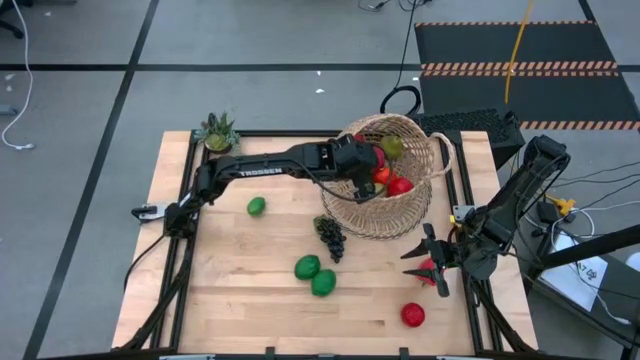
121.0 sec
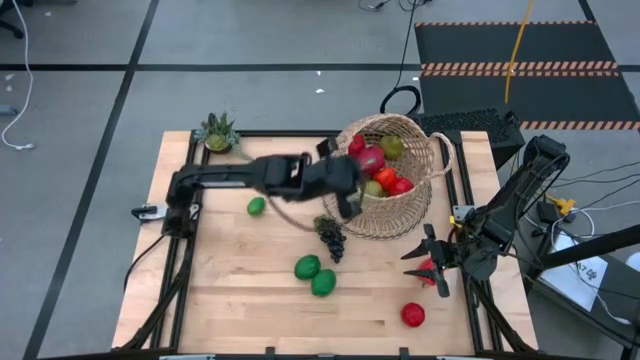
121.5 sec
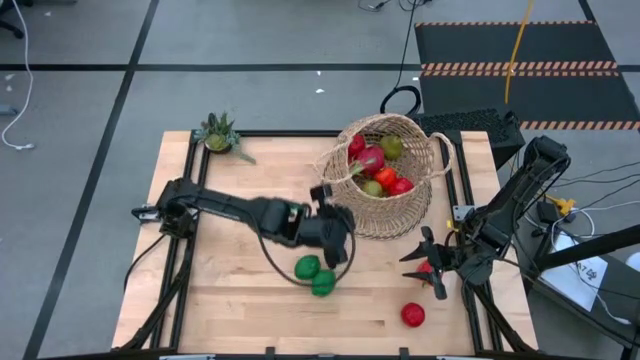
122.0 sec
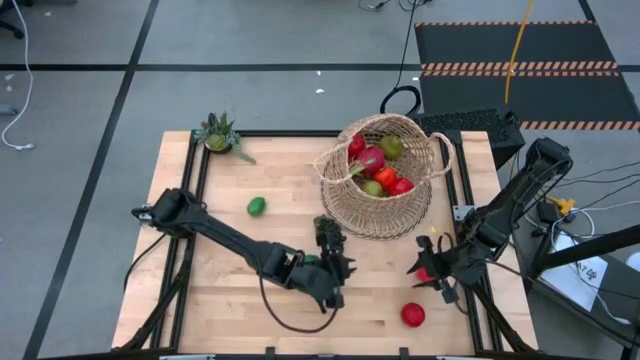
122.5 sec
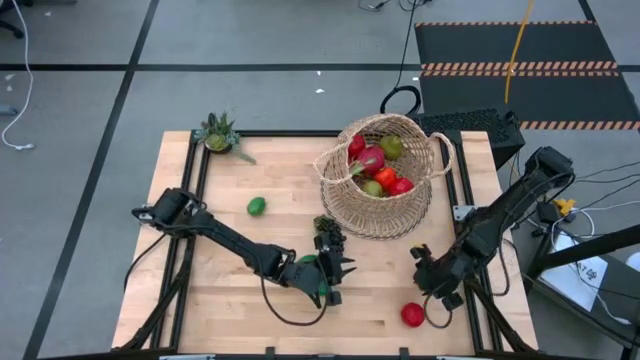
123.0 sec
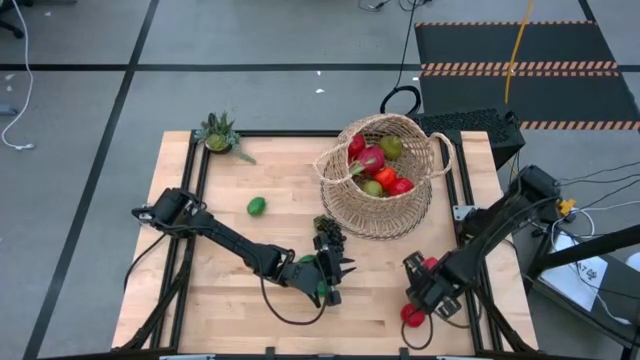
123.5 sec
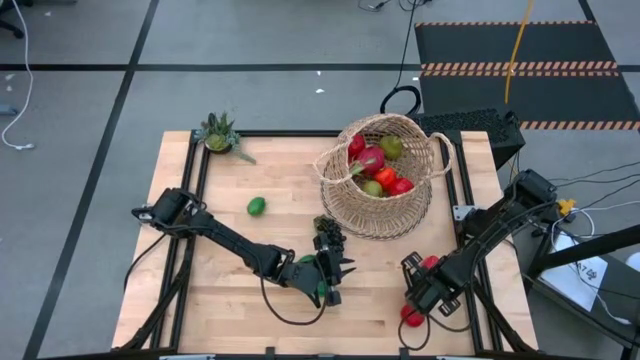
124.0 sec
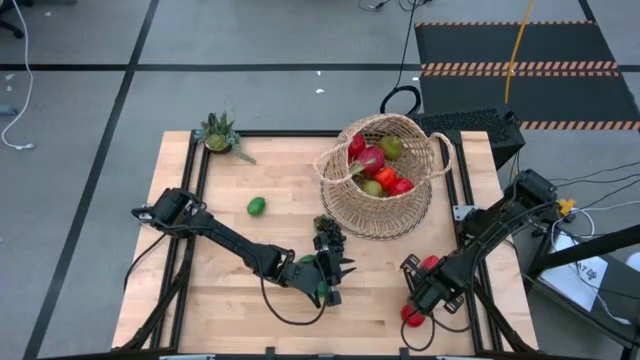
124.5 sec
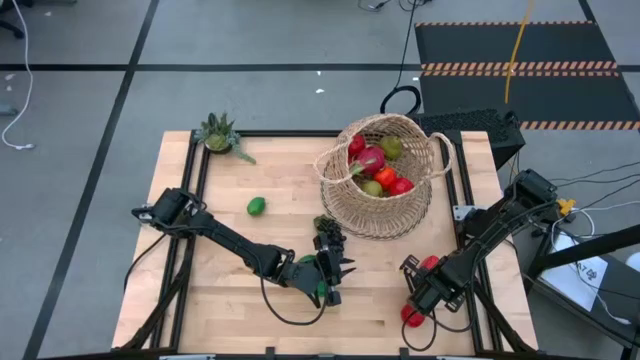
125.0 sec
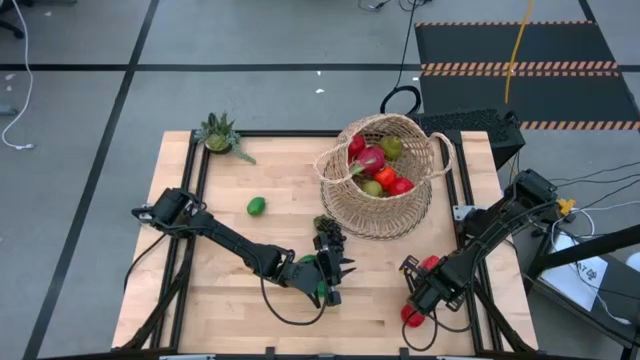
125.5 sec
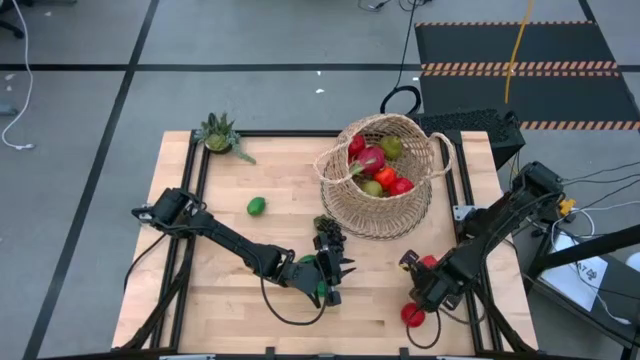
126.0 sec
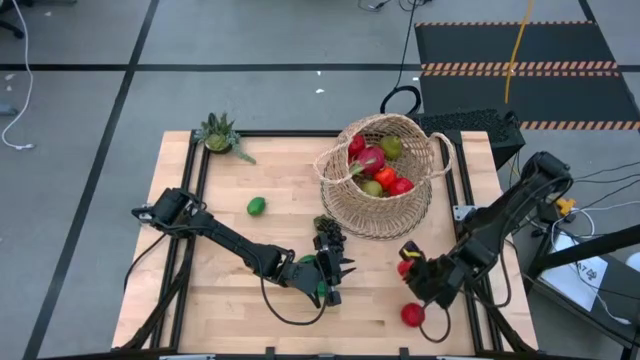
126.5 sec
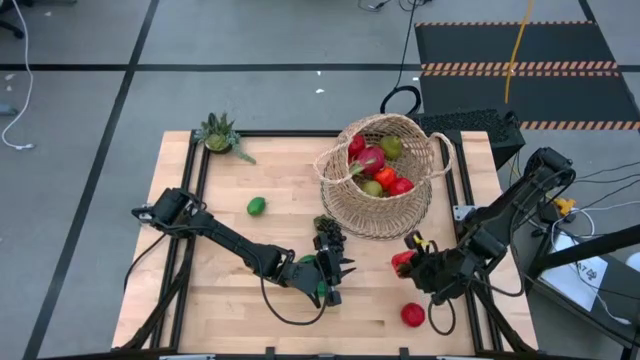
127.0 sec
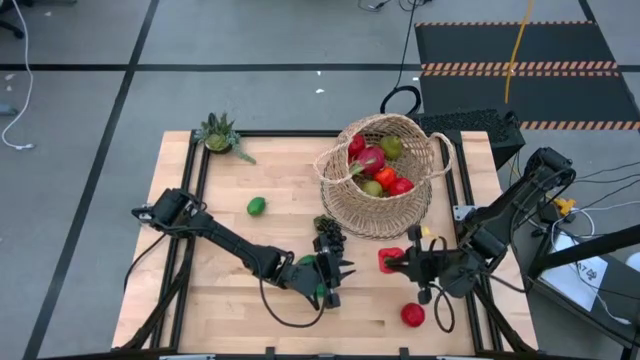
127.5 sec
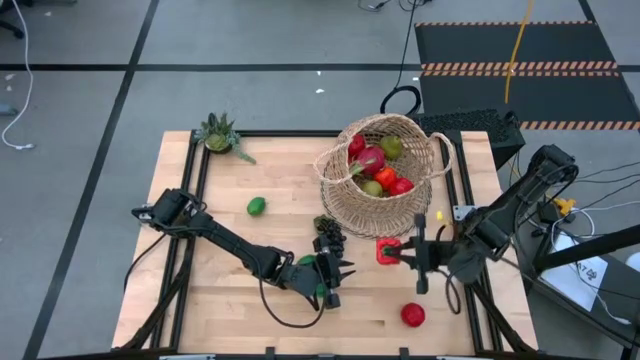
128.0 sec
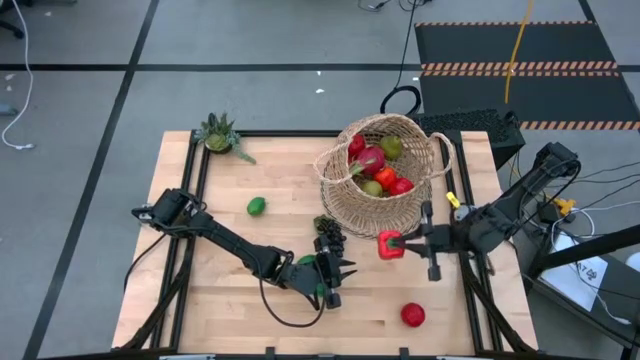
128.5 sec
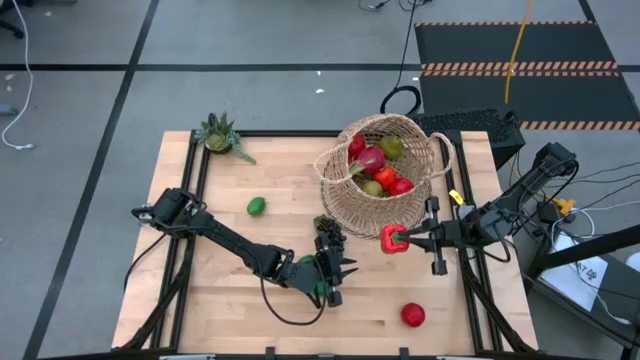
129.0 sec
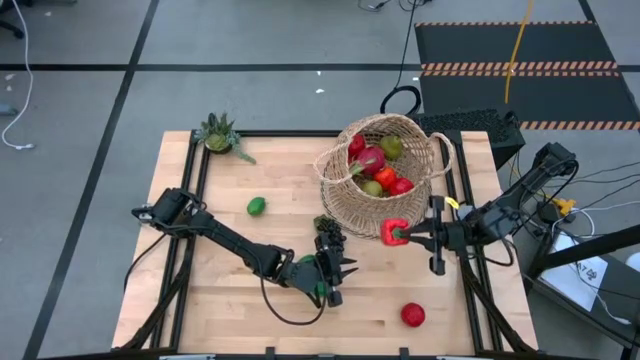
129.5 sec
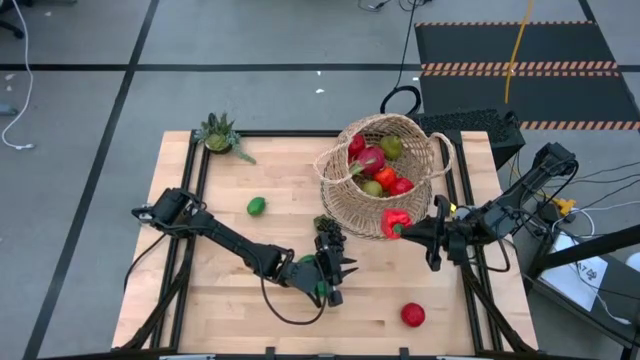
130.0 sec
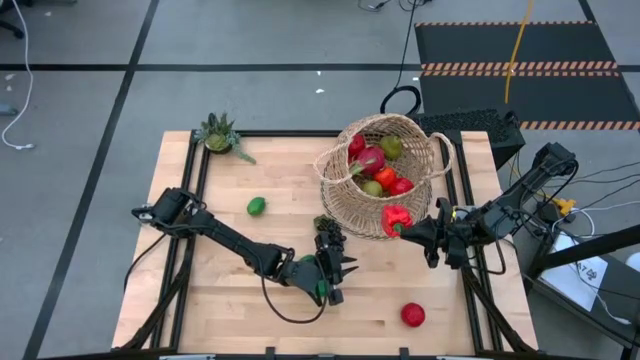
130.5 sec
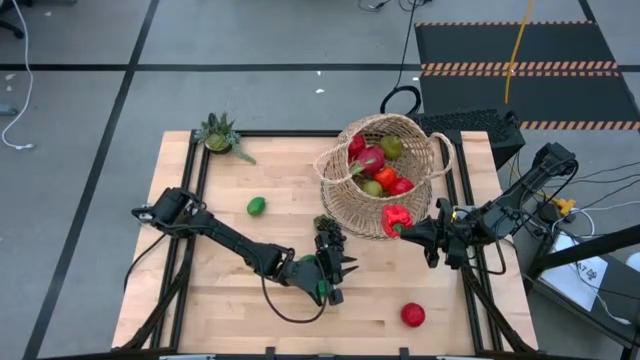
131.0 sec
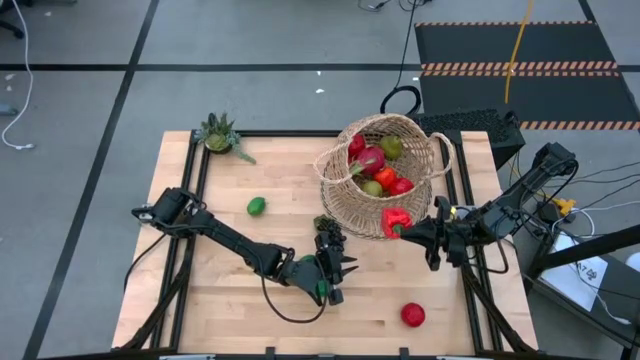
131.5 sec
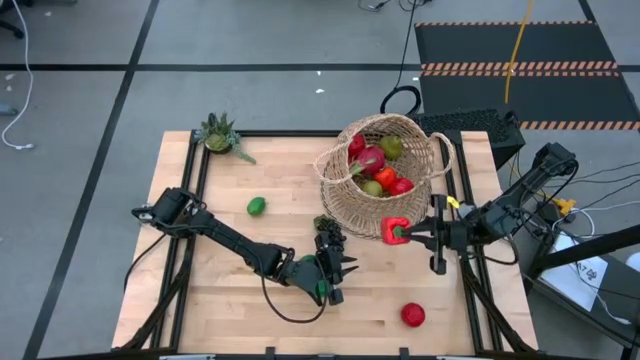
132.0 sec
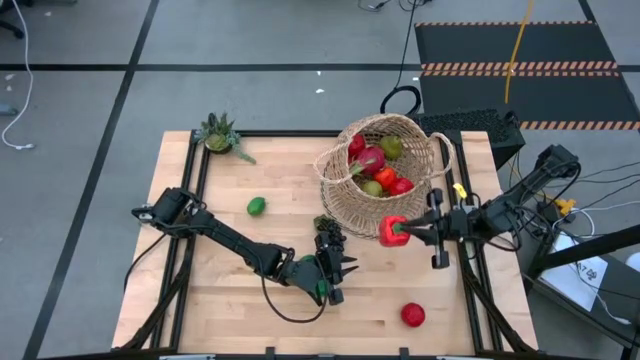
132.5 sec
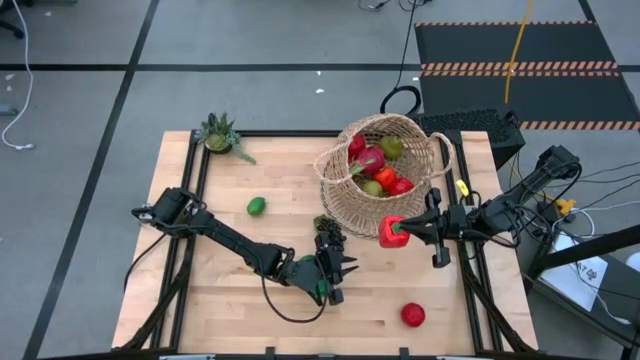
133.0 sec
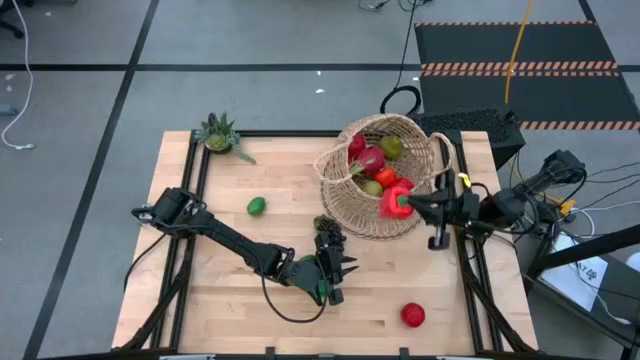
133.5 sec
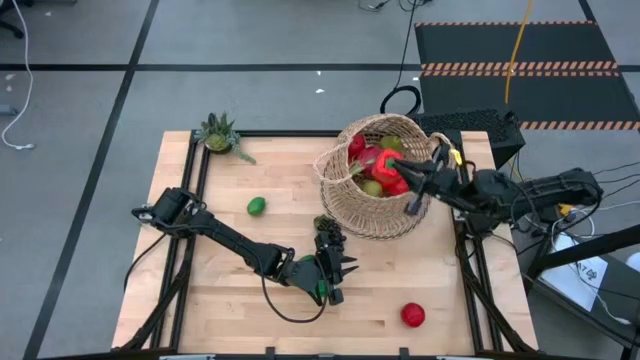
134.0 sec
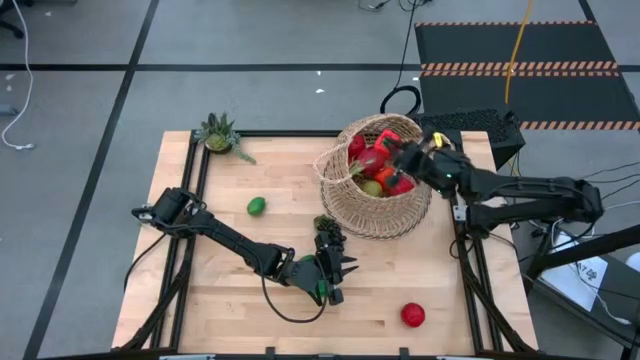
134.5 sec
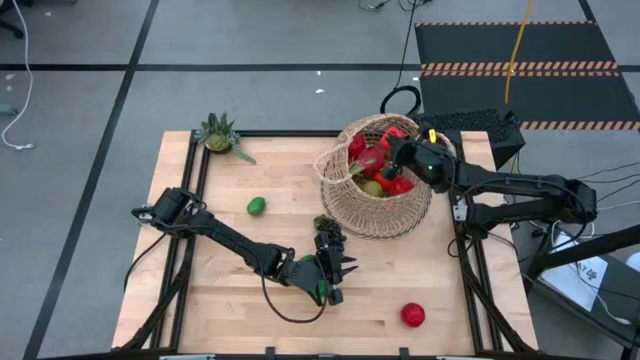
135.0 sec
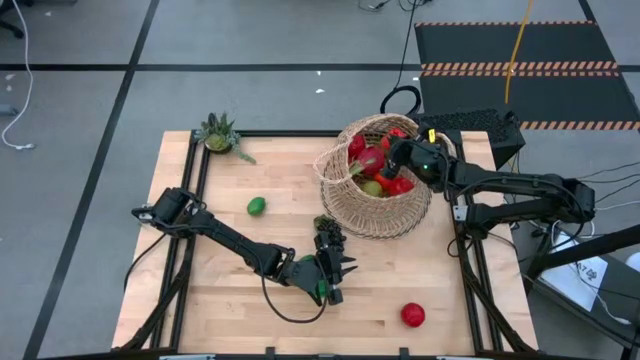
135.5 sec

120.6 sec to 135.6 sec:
Task: Build produce basket
Put the red bell pepper into the brown basket

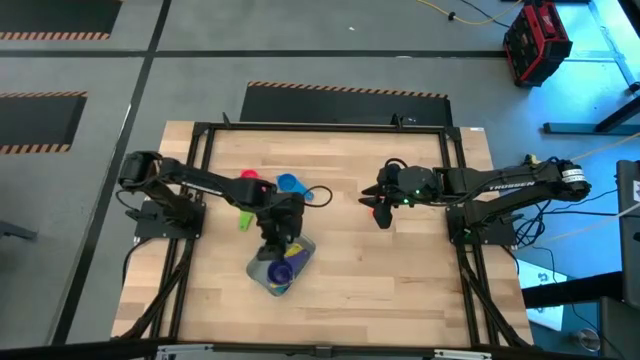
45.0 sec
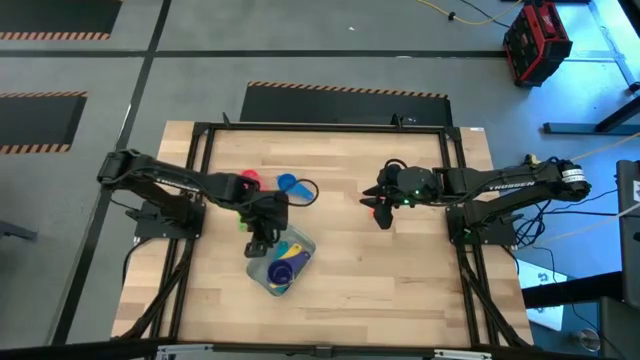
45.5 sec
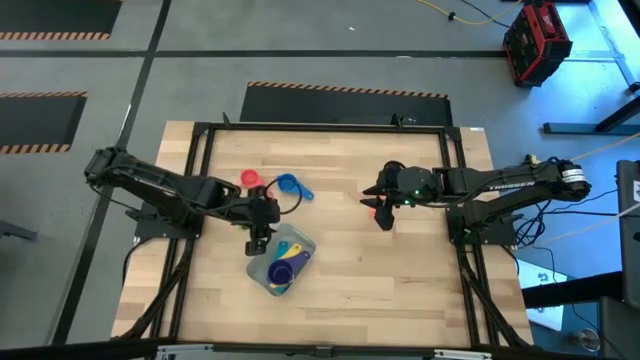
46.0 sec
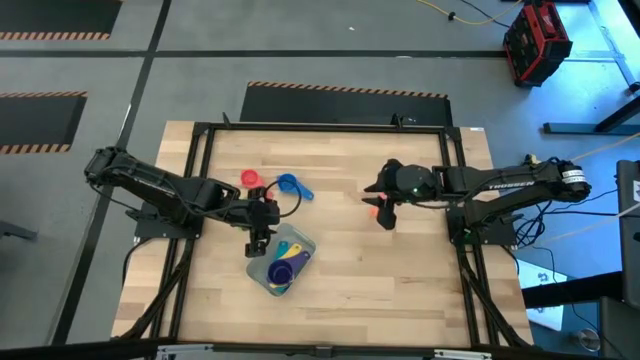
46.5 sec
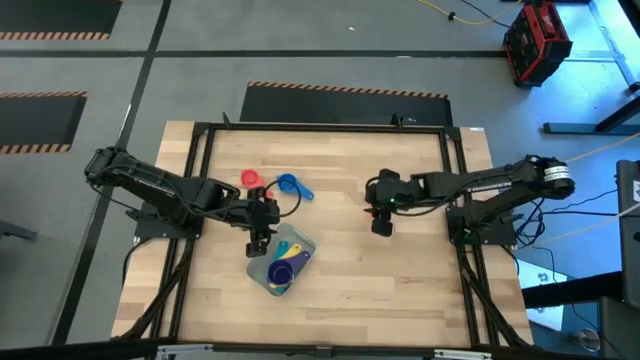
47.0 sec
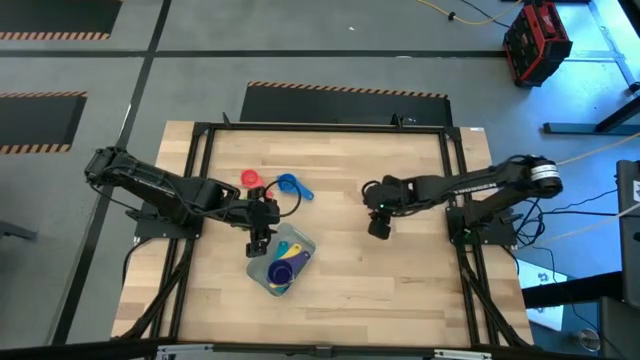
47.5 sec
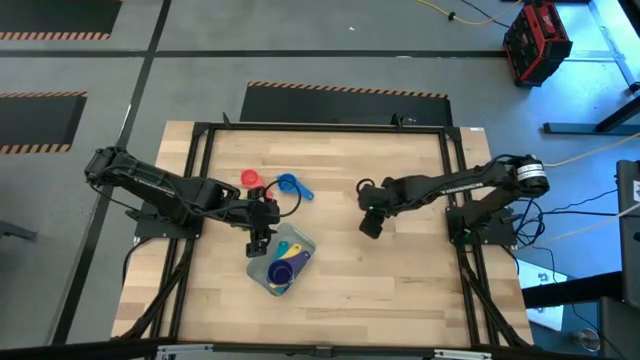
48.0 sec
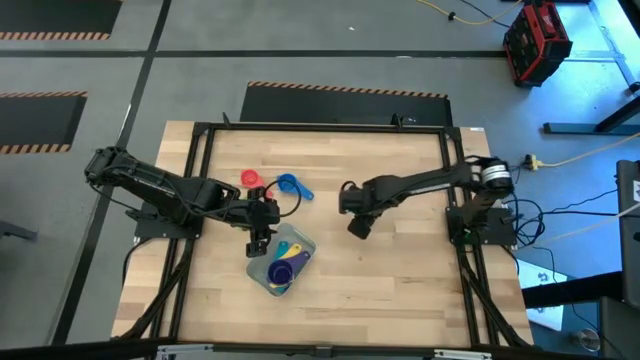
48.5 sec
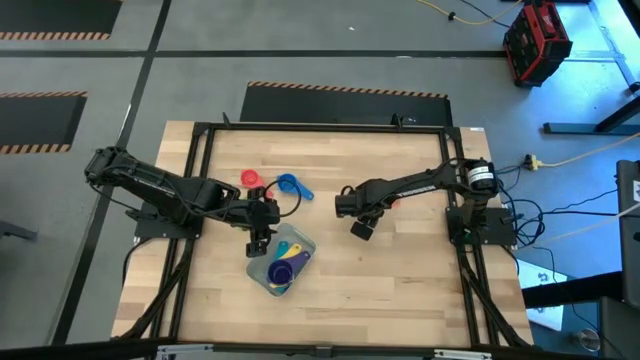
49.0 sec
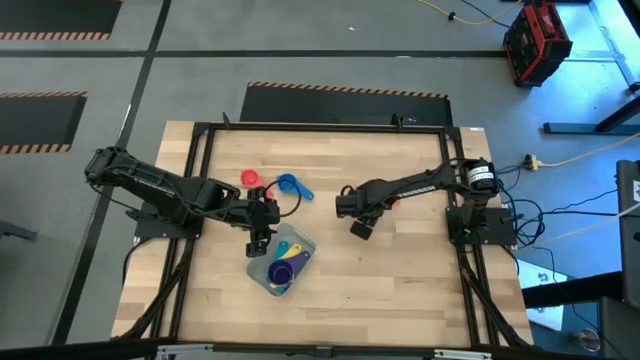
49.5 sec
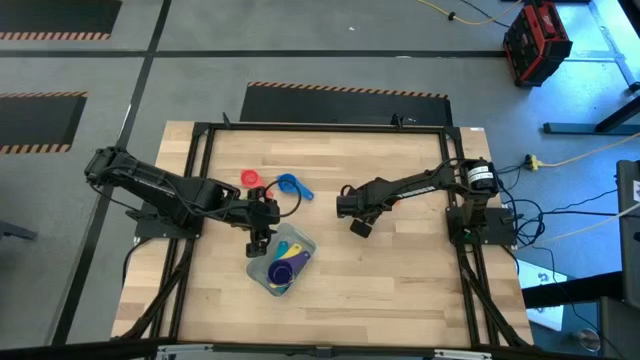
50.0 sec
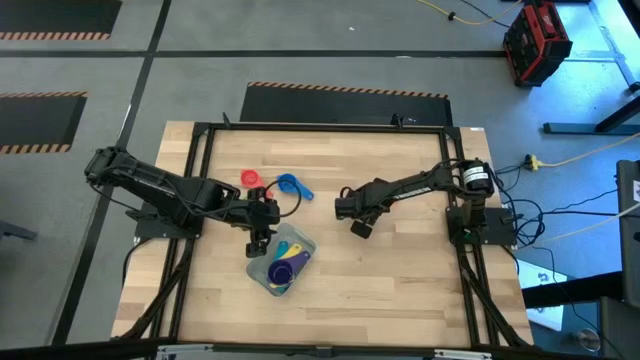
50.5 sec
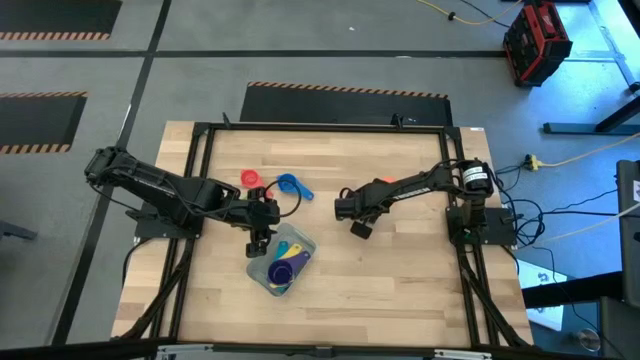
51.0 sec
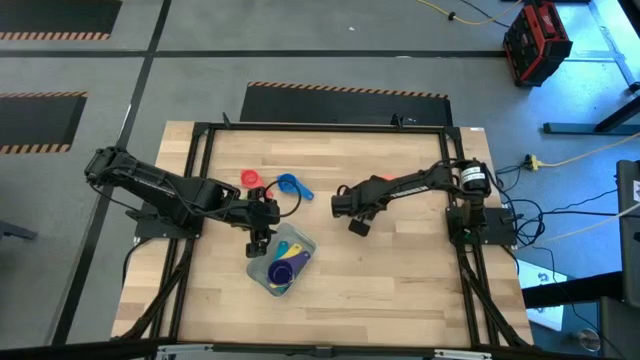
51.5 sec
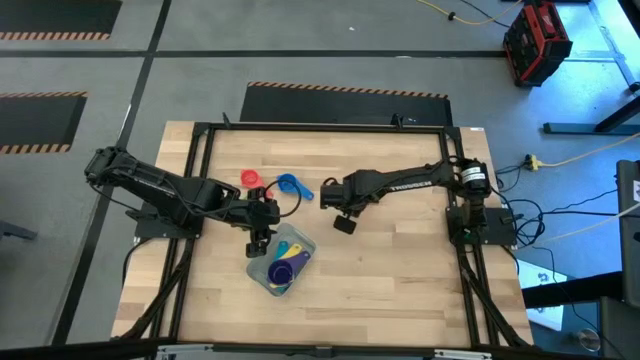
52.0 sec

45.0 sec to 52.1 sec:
Task: Nest measuring cups in basket
Stack the orange measuring cup into the purple measuring cup in the grey bin
